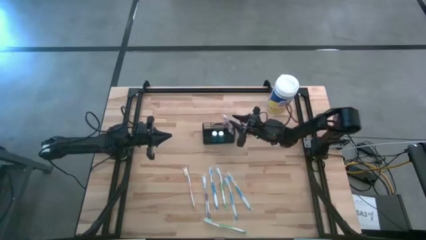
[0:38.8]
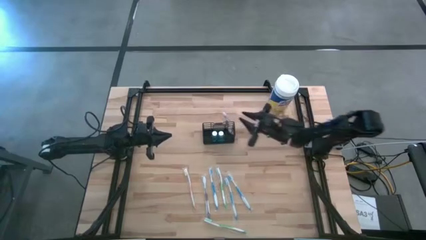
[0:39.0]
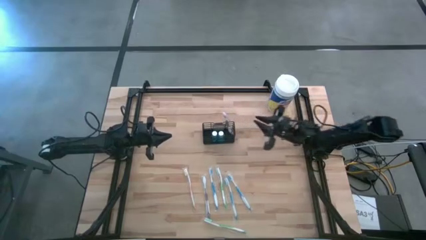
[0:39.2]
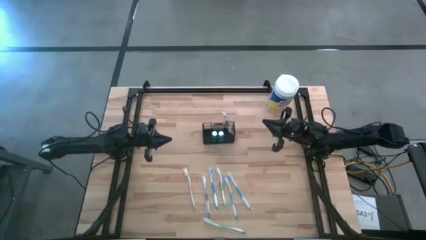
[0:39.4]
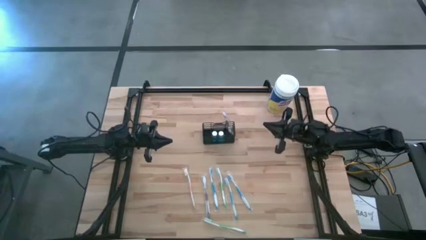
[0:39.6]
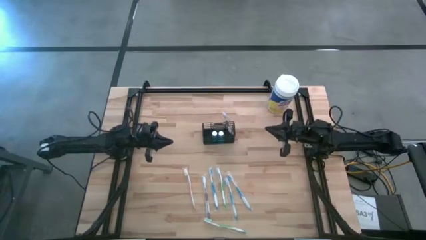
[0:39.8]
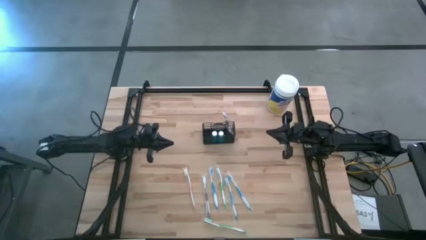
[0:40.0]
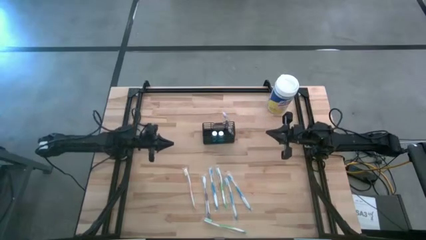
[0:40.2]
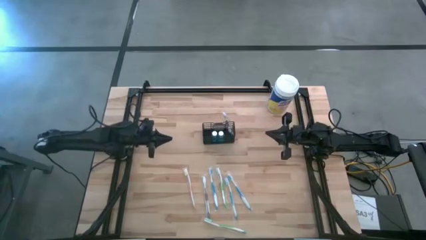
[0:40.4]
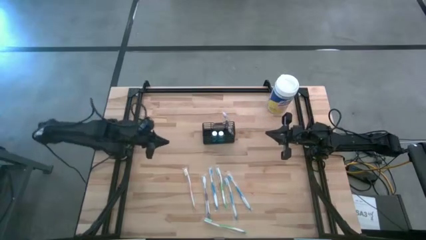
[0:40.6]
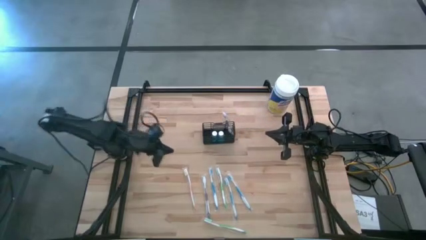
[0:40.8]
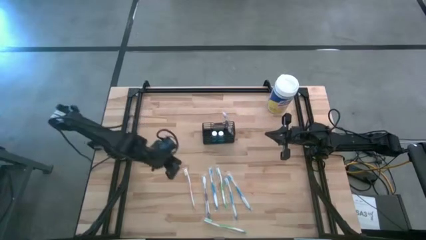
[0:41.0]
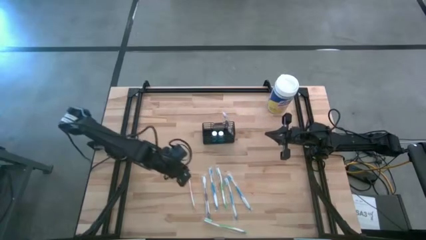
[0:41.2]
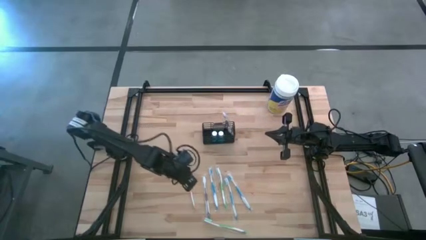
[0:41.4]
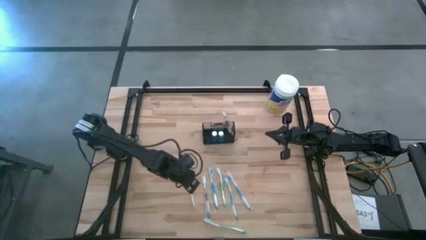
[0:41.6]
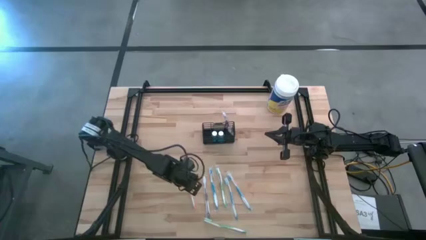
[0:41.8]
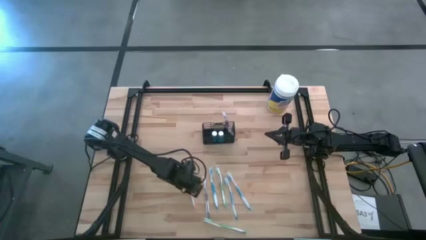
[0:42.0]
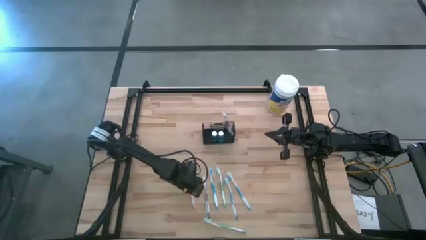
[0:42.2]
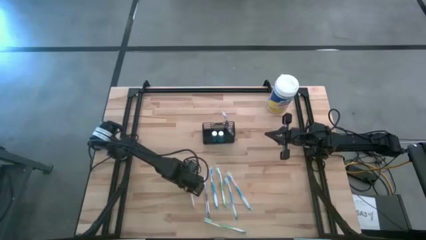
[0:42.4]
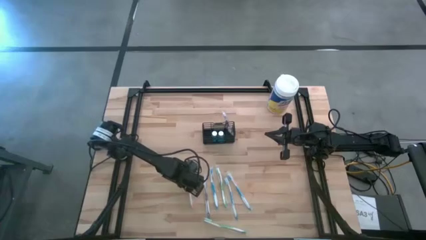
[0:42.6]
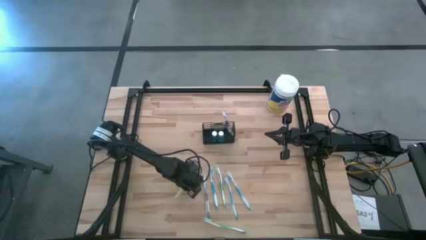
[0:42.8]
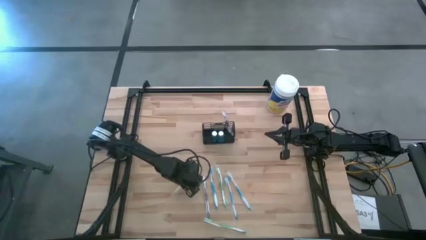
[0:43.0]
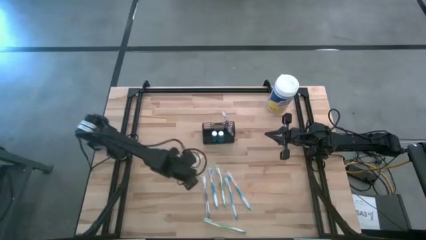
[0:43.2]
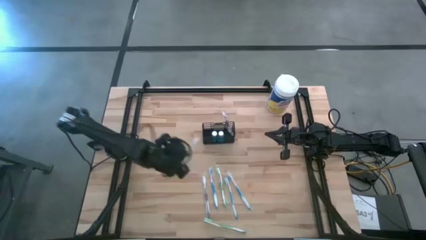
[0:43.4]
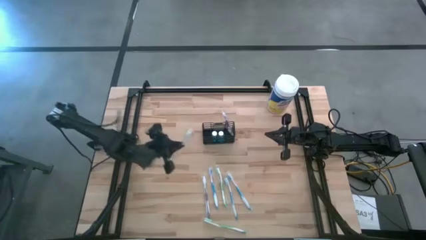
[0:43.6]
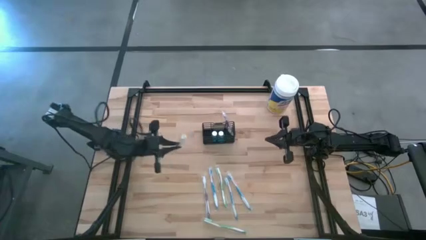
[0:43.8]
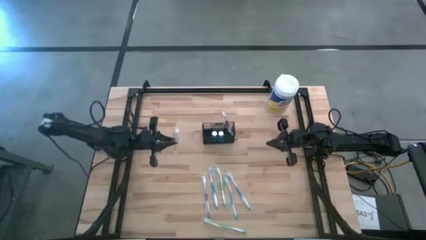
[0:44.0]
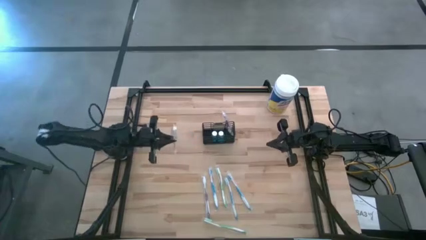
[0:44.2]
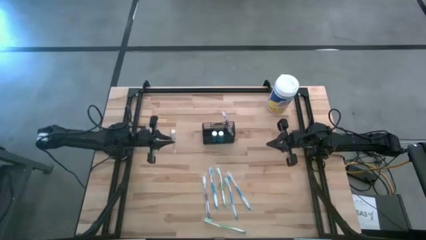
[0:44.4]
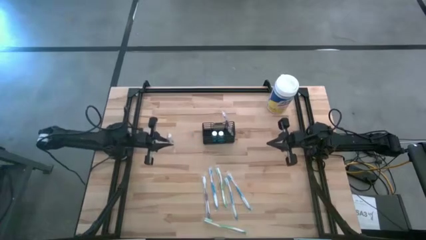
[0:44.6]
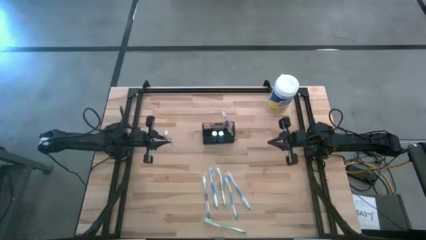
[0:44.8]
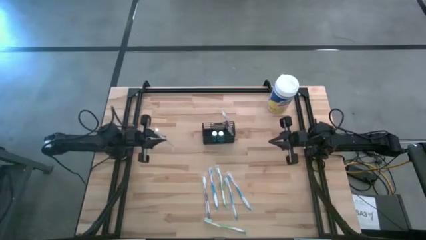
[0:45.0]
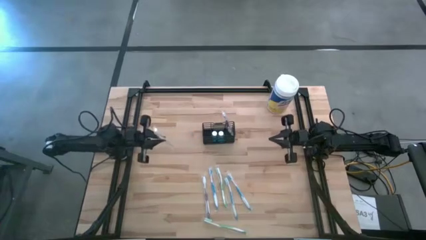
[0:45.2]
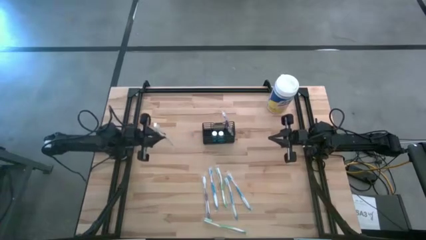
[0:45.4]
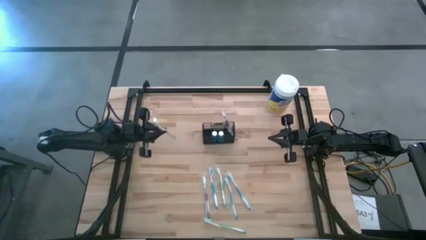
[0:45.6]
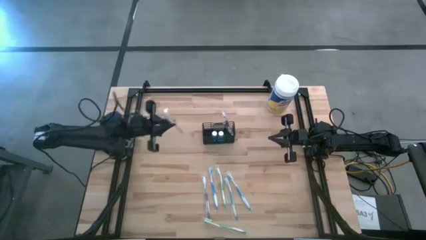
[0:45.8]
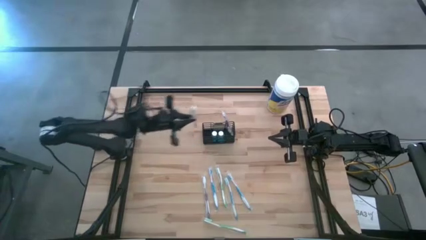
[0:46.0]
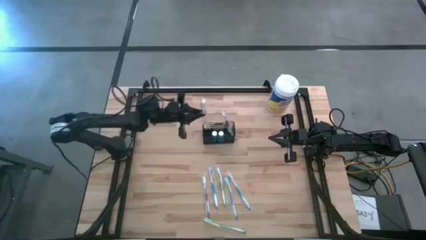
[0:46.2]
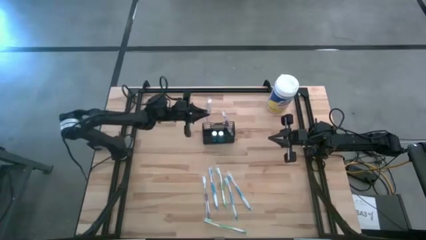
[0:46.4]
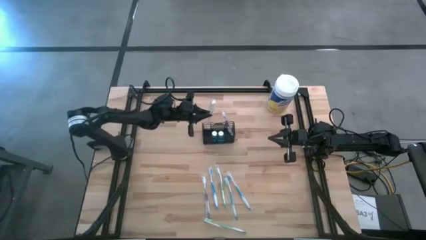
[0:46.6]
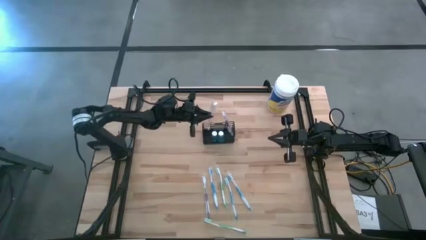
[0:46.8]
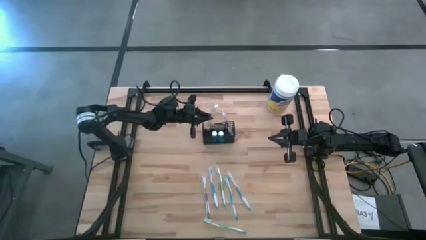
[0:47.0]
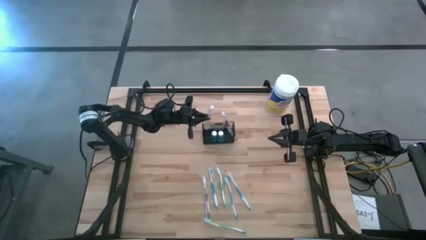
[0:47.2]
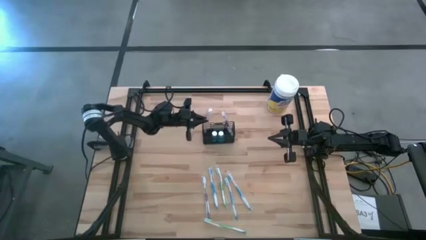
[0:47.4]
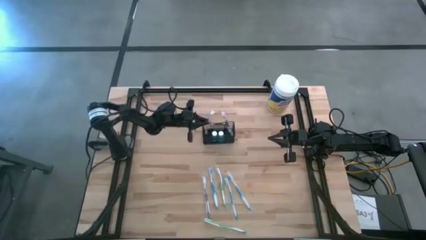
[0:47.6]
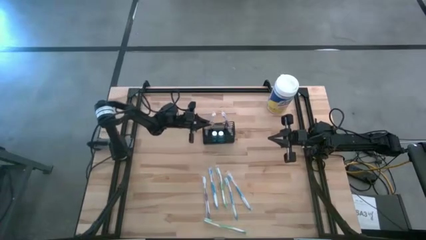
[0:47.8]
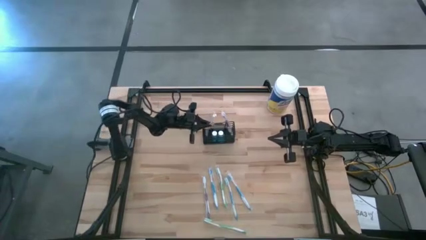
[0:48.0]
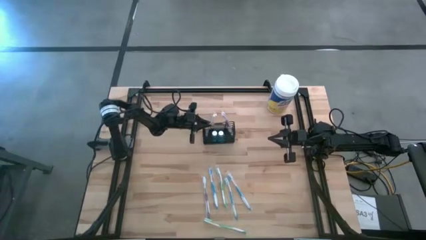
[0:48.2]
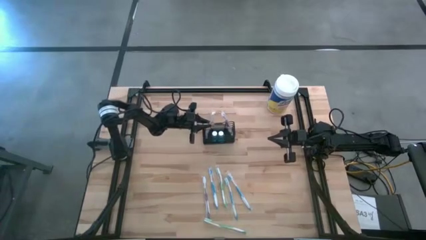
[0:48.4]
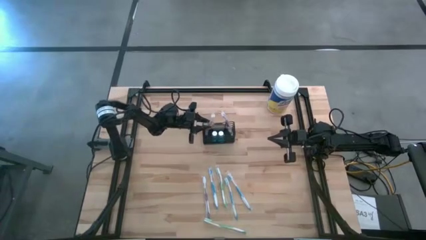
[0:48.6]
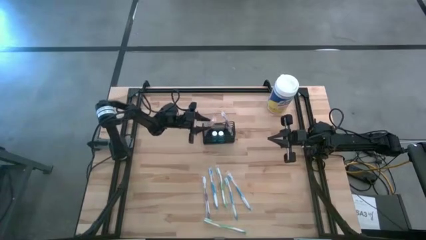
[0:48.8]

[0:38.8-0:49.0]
Task: Pick & Place toothbrushing station
Put the orange toothbrush into the mesh organizer

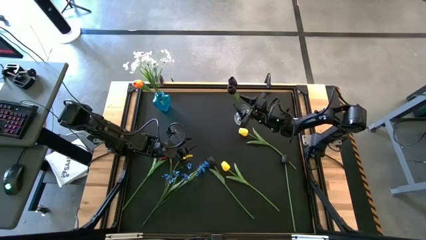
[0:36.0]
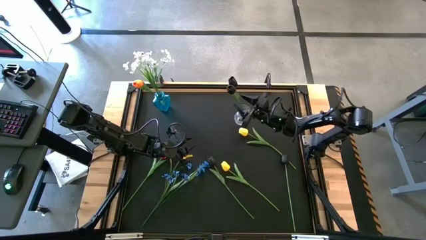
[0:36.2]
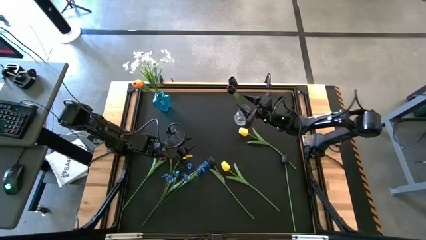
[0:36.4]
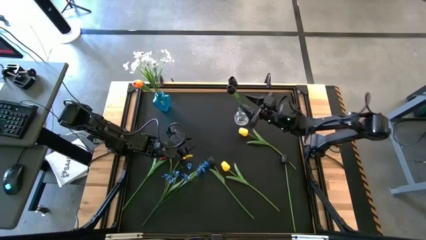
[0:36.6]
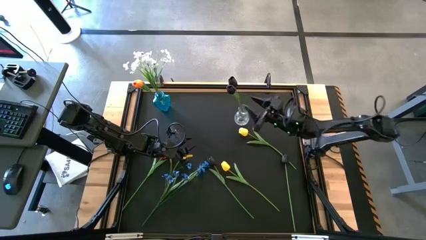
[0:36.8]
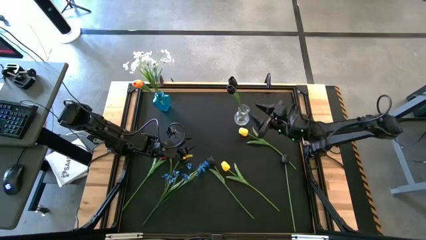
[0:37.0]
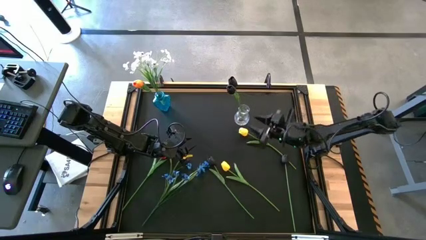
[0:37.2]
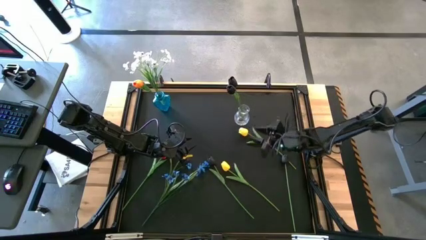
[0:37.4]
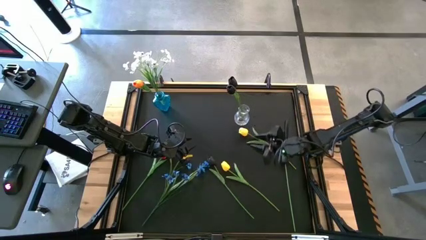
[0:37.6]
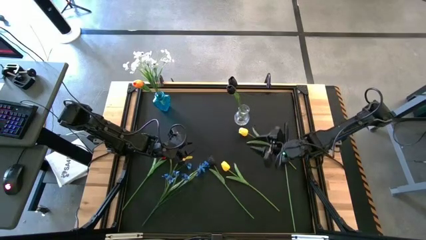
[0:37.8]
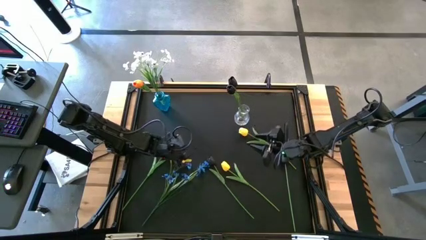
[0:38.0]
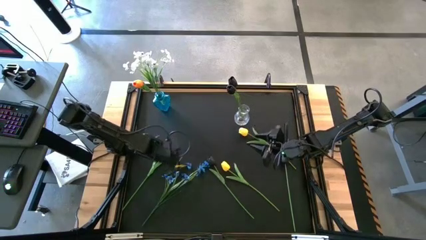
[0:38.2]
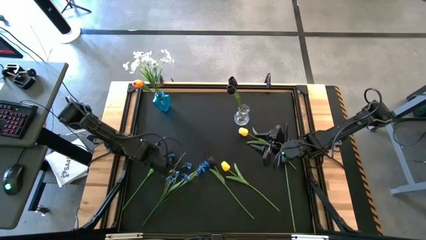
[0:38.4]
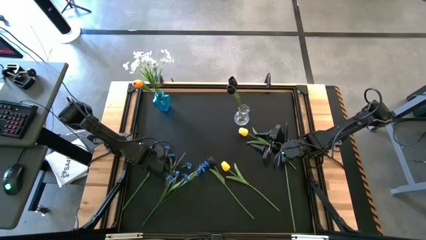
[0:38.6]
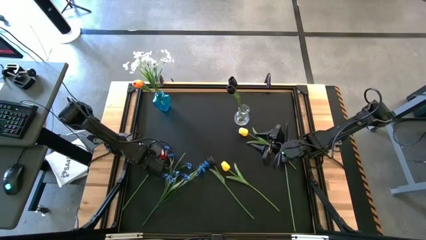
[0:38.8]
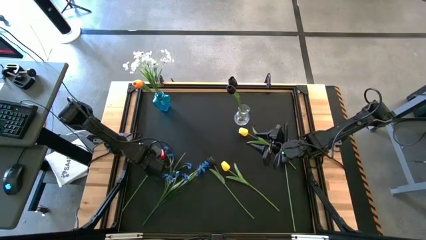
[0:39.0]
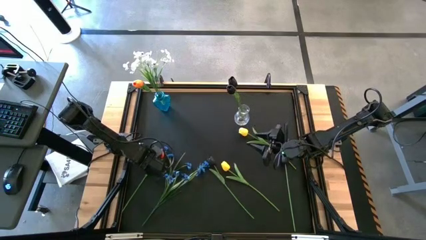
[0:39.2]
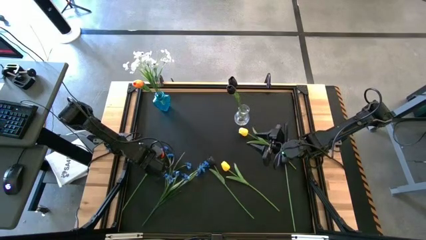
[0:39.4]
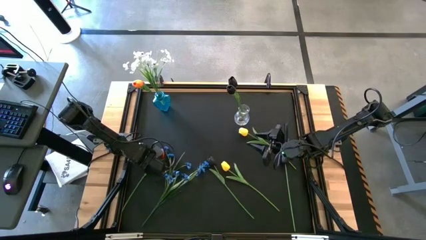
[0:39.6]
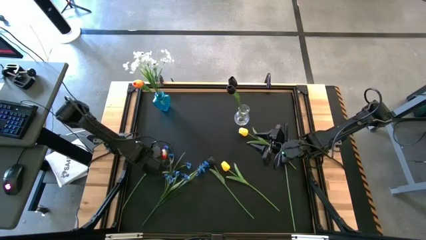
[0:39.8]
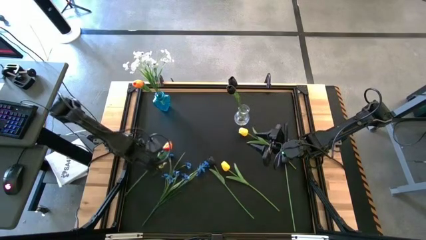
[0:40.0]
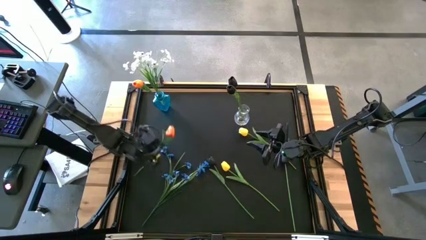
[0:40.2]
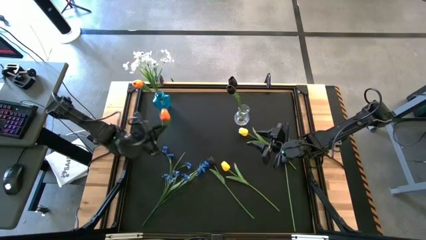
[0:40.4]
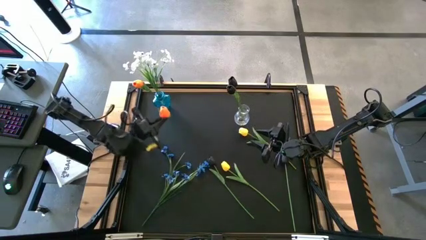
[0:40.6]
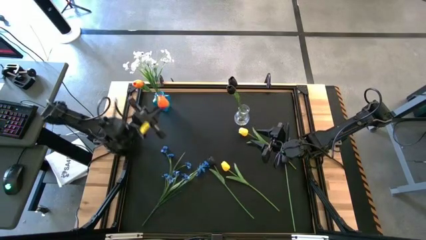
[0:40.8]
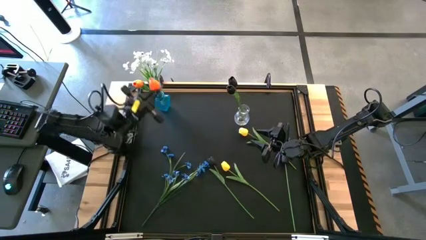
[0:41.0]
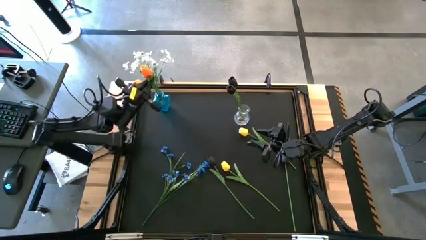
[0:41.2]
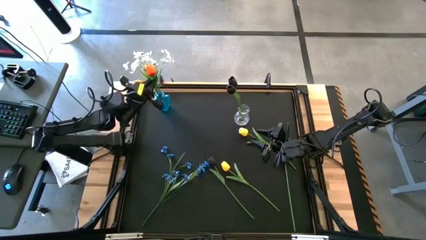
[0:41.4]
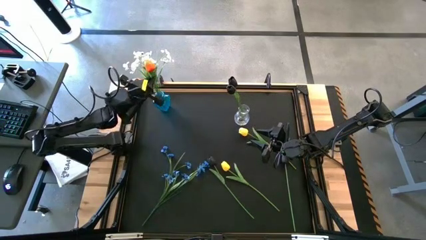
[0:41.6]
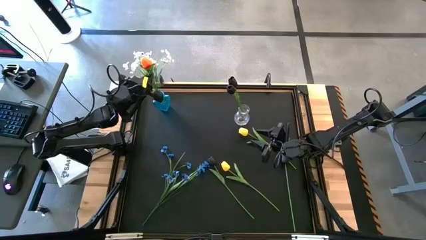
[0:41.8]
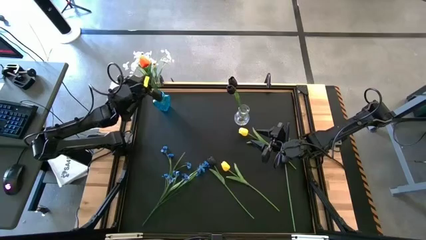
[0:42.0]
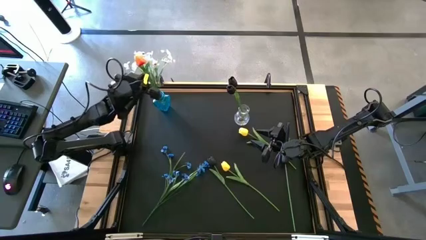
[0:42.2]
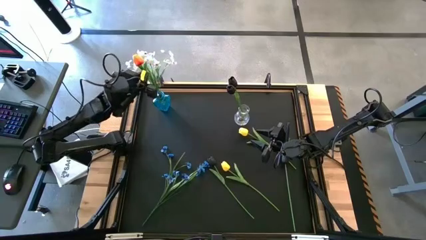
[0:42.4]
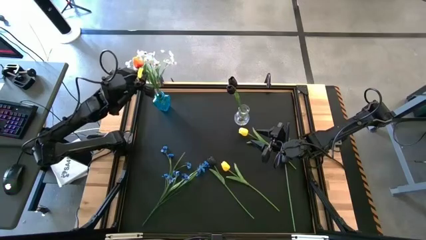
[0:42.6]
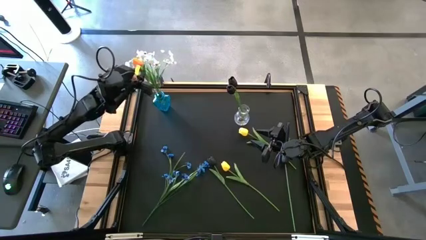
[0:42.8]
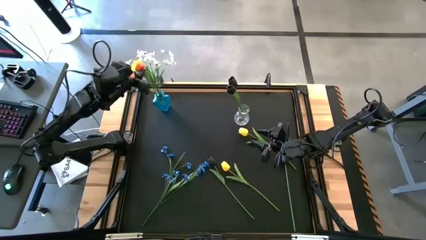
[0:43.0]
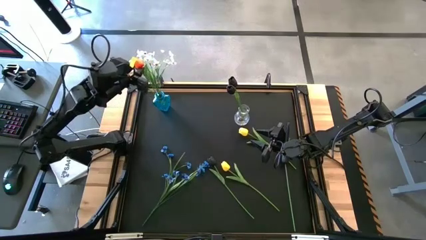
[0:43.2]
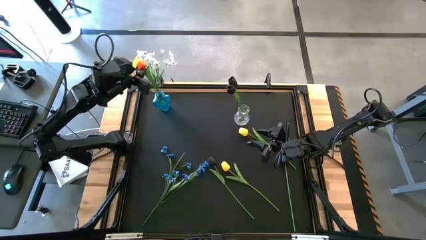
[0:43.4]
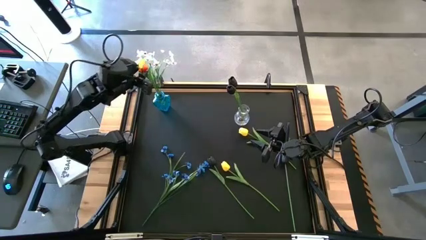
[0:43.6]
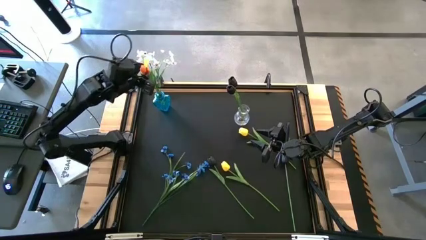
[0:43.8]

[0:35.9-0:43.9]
Task: Sort flowers into vase by color
Put the orange flower into the blue vase
